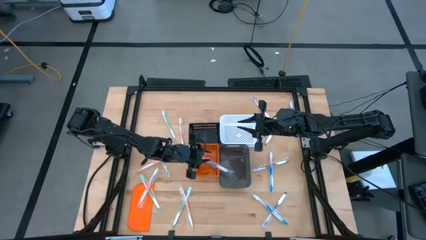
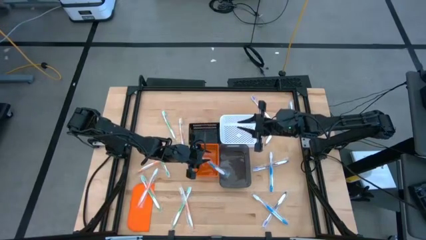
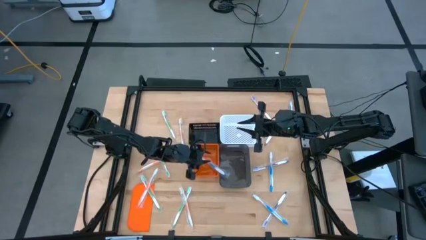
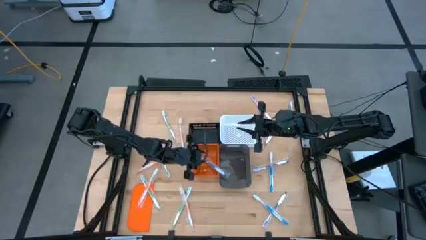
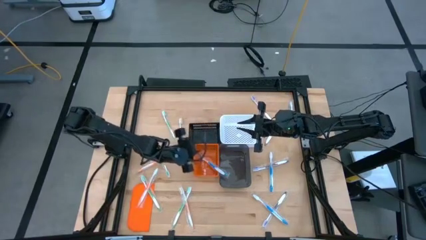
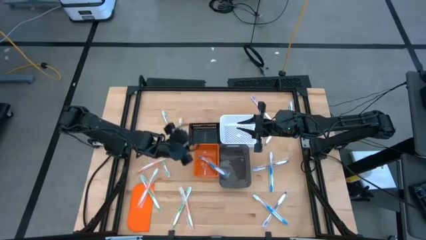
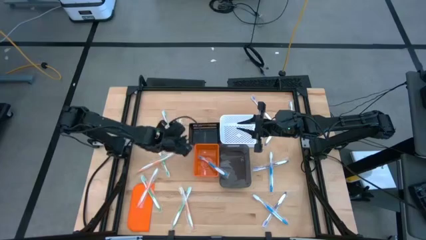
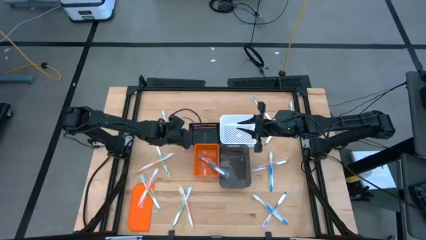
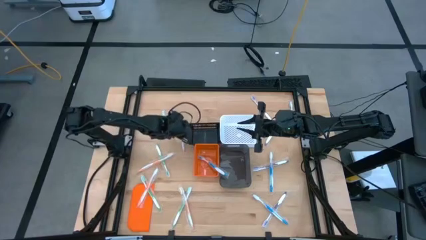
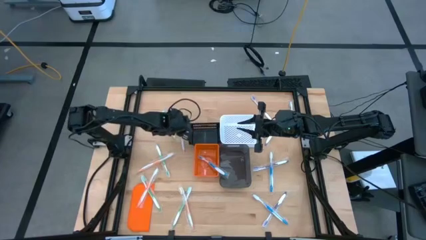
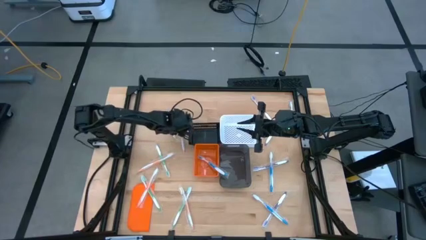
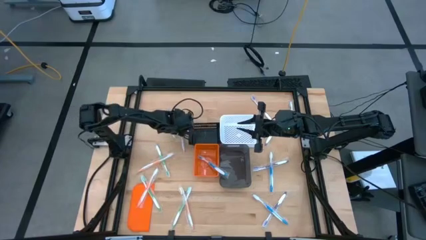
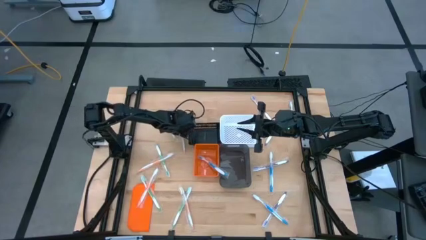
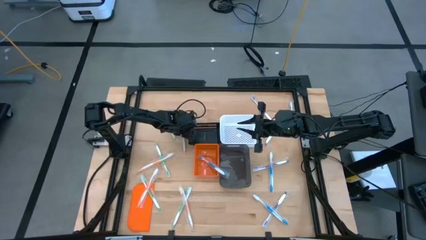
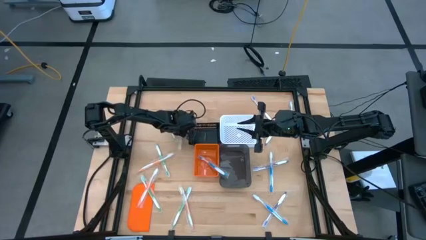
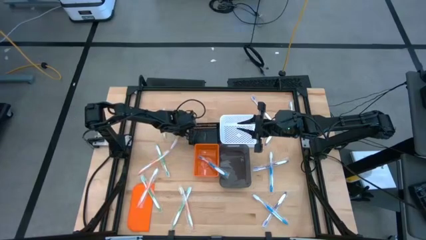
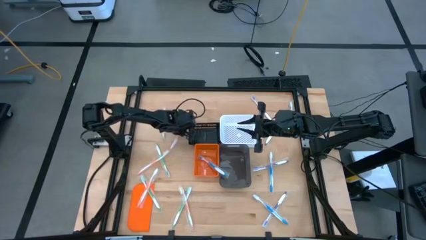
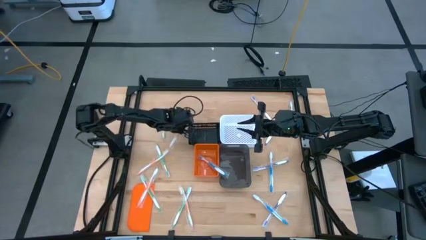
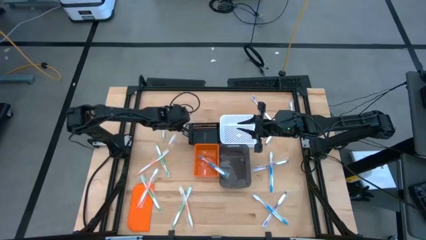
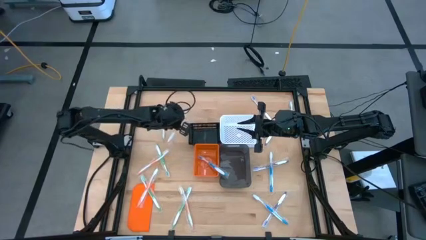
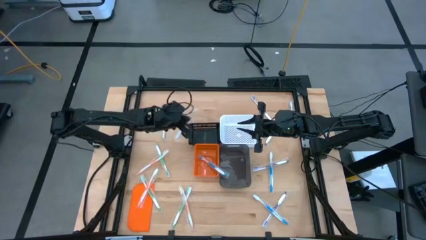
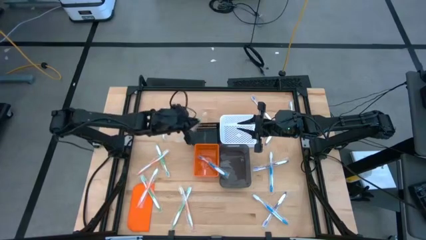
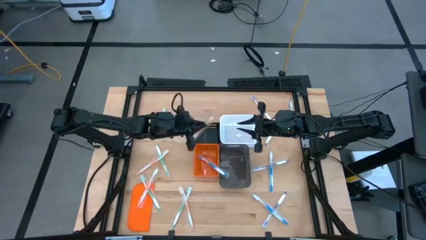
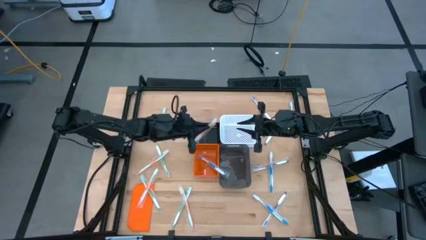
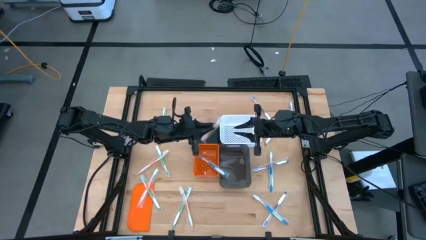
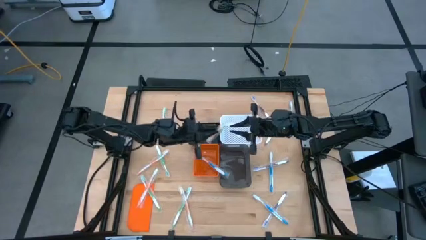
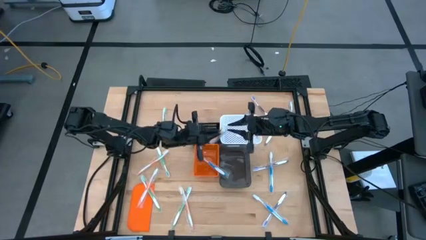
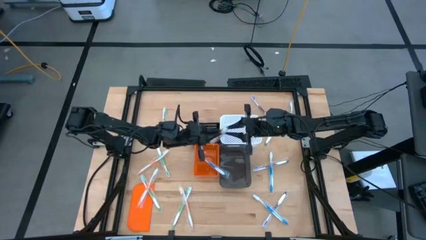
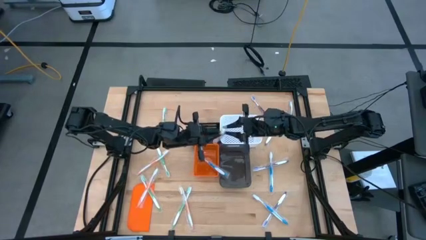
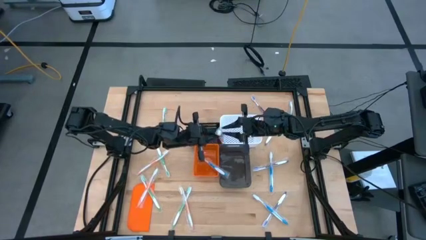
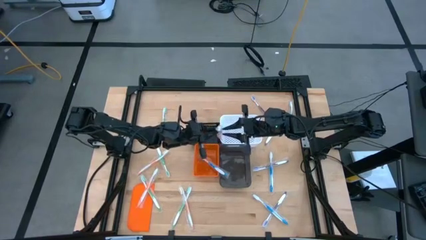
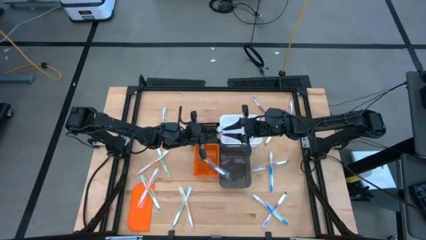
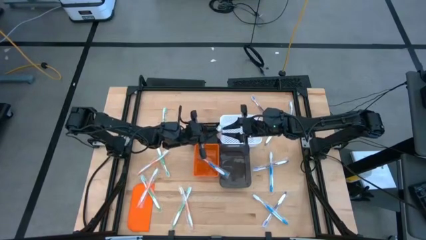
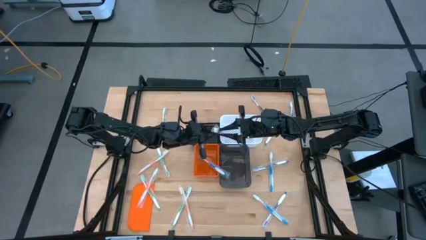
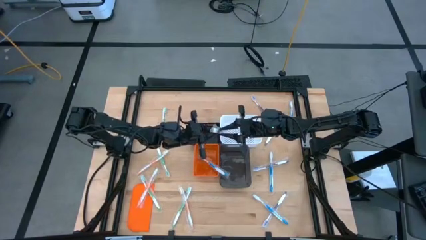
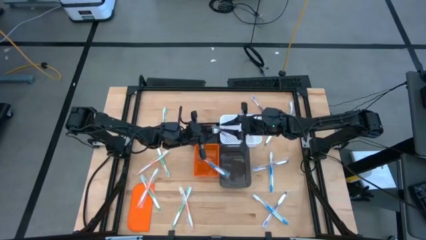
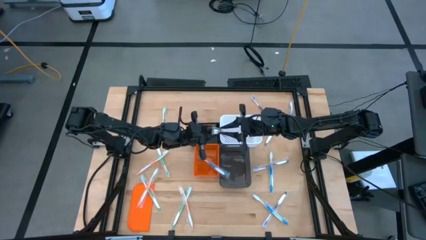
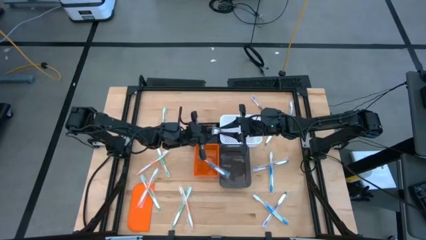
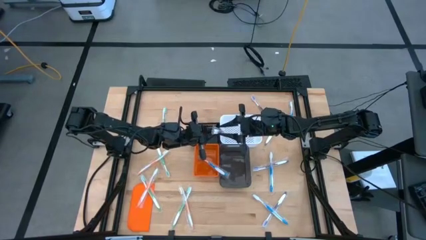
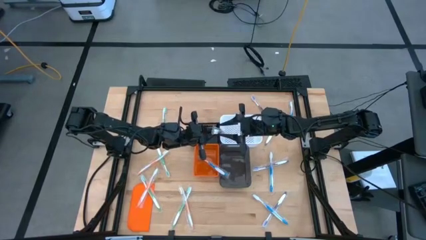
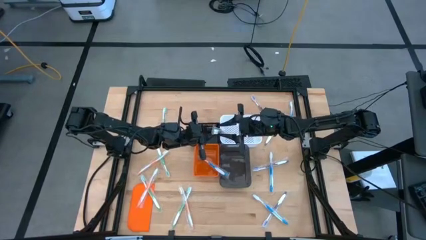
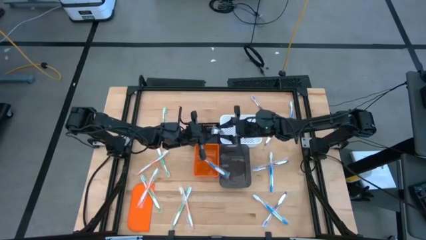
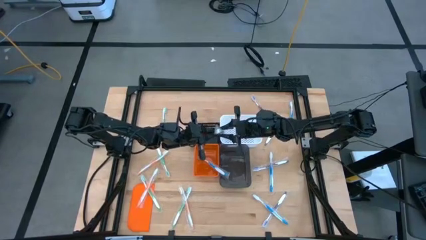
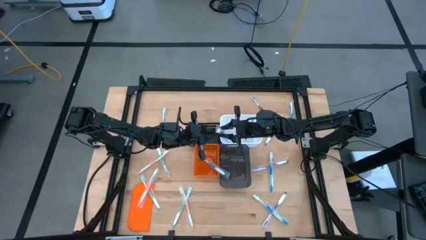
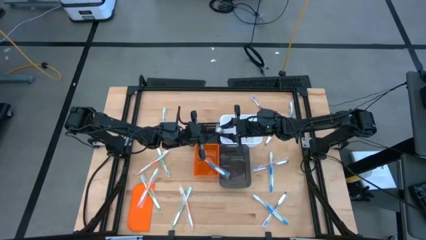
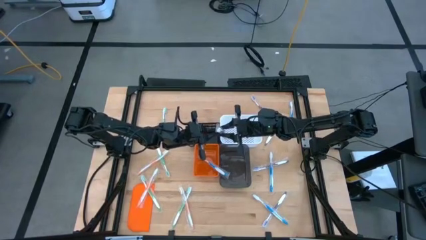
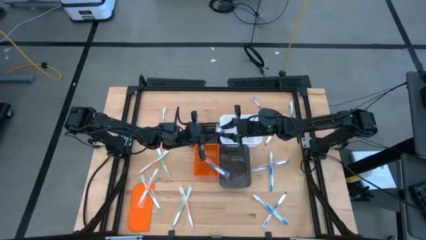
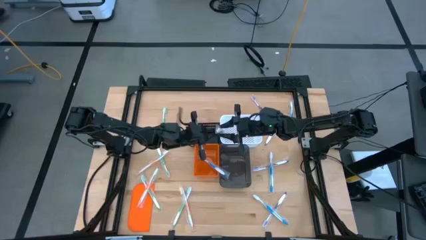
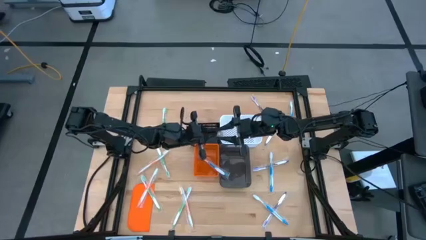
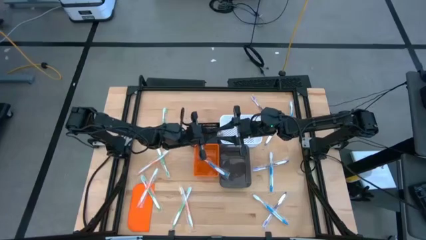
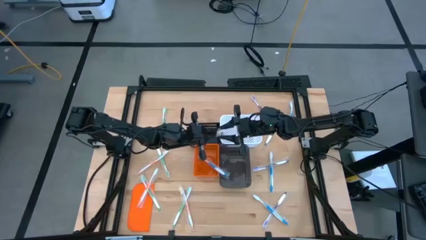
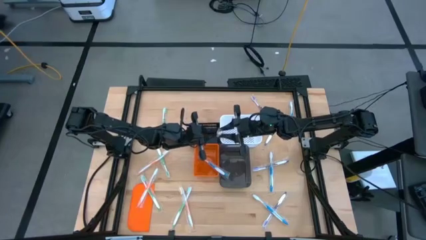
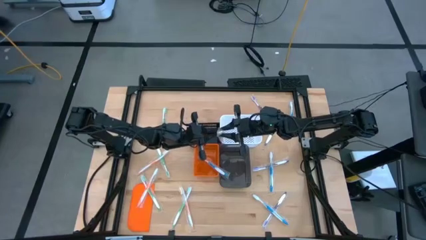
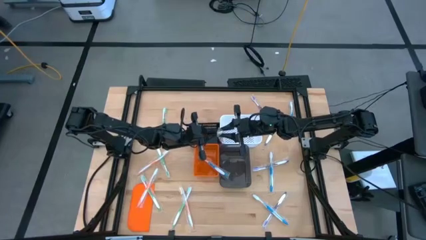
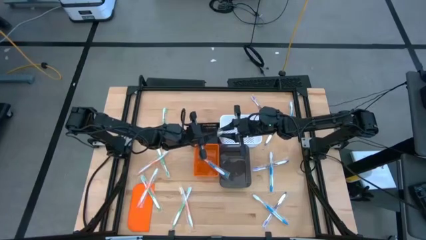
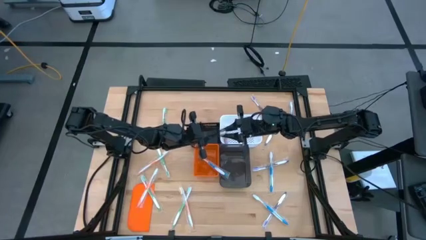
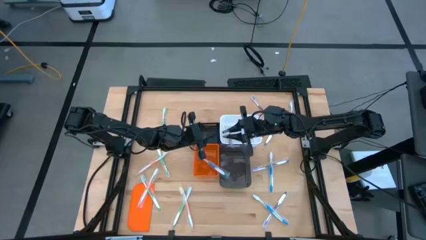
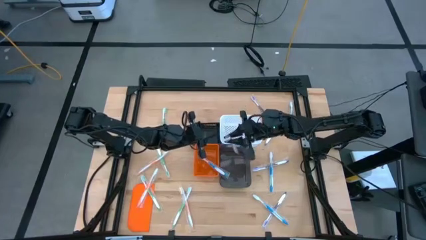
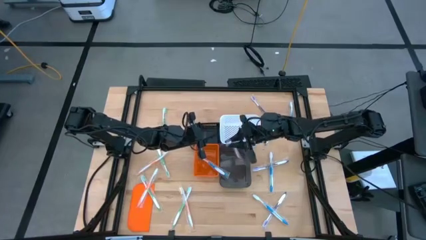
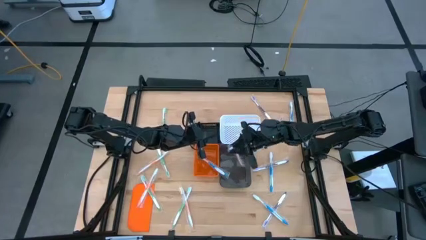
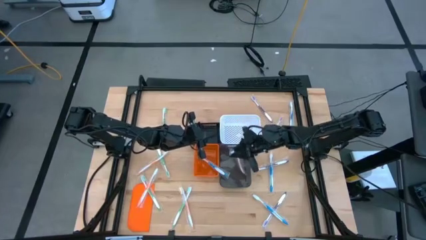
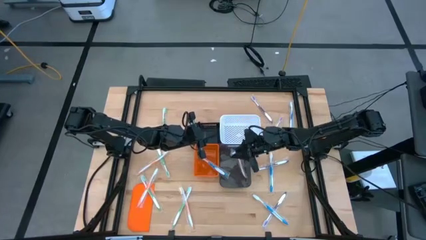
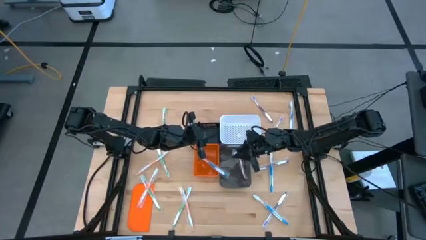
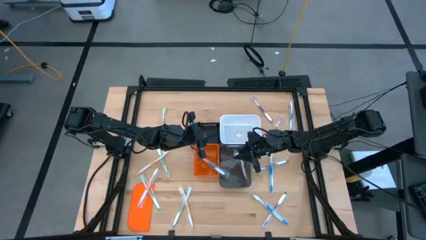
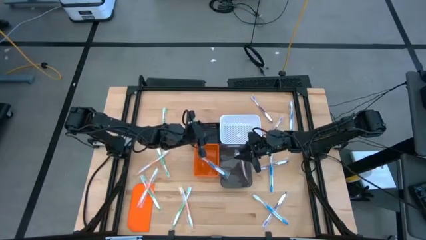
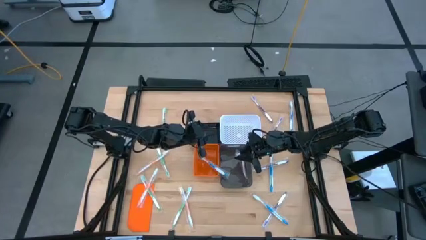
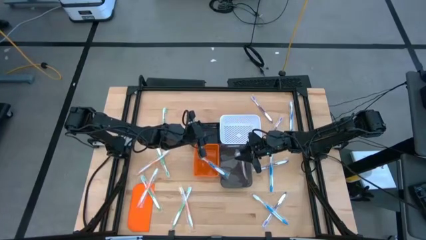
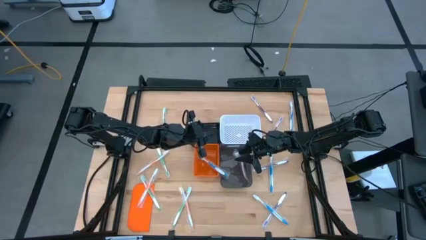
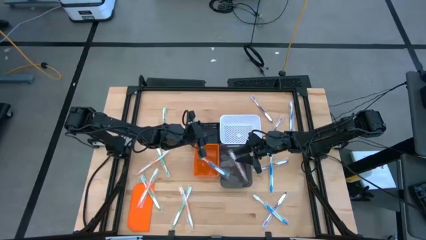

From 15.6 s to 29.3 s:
Task: Pick & Place Toothbrushes
Put the orange toothbrush into the gray bin

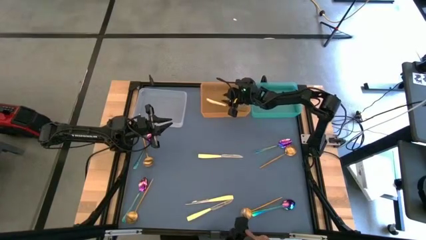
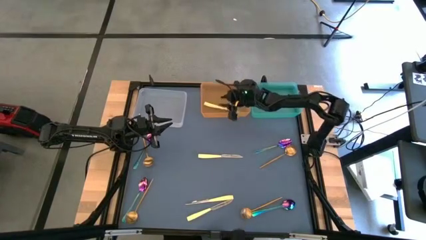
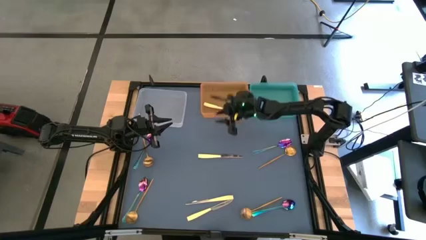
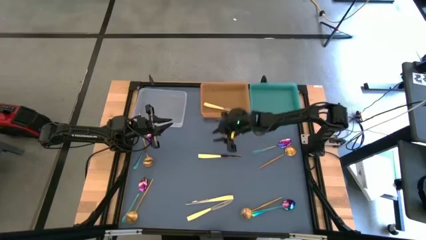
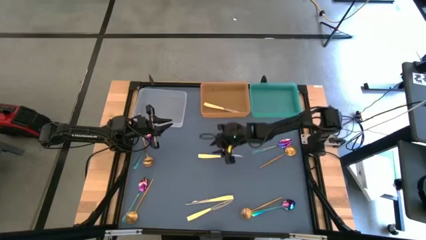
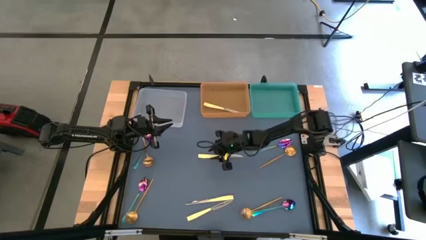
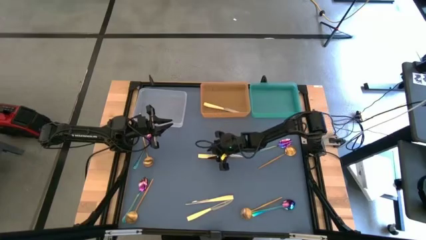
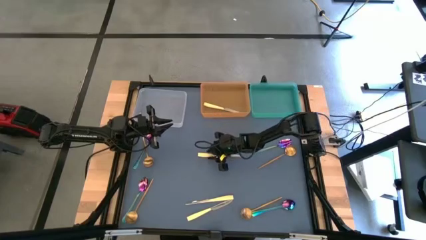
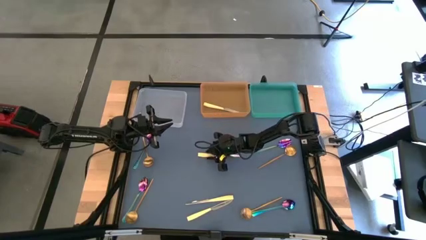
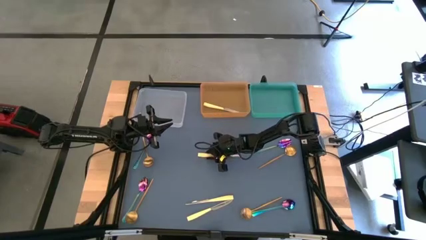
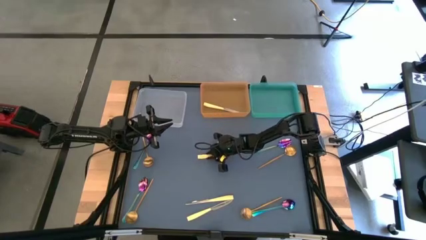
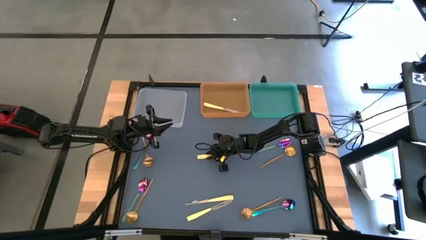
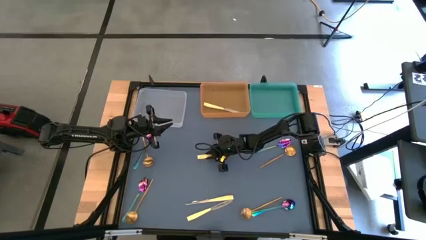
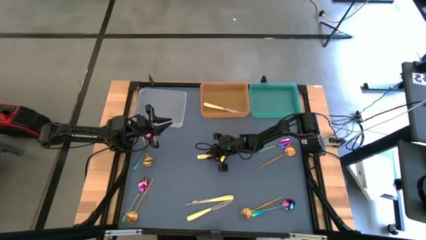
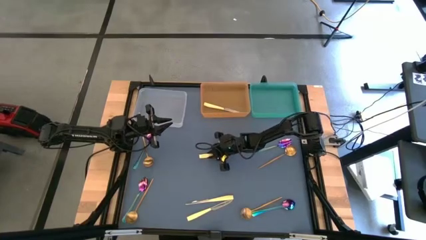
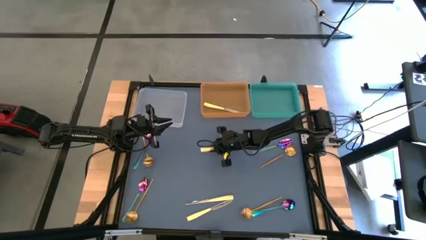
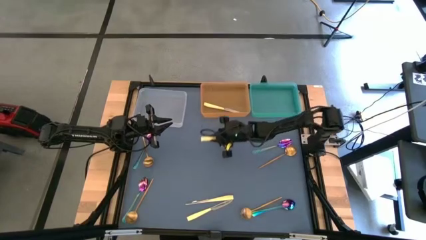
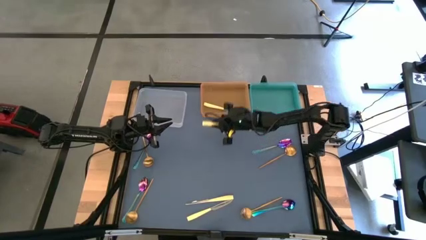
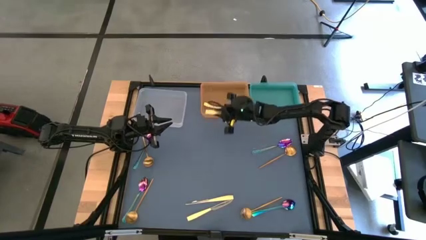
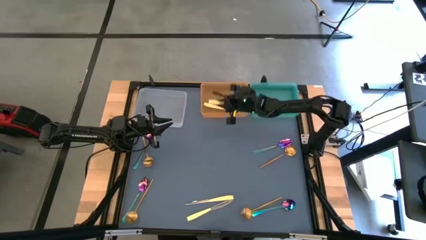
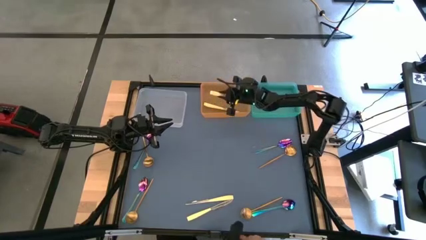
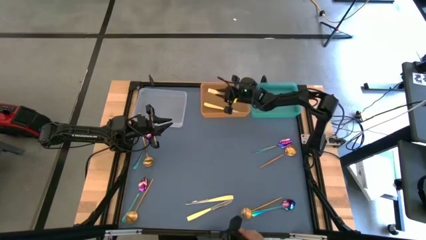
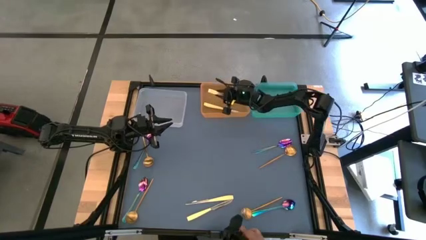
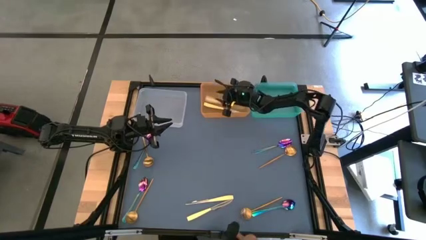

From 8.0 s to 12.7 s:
Task: Sort silverware by color (type)
Put the yellow table knife into the orange bin
